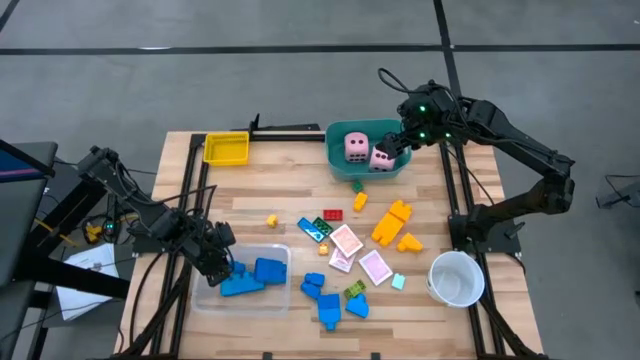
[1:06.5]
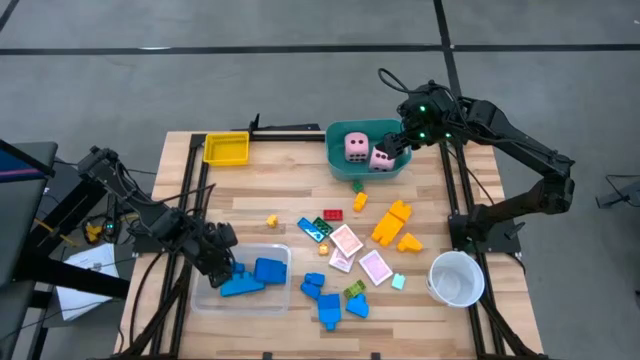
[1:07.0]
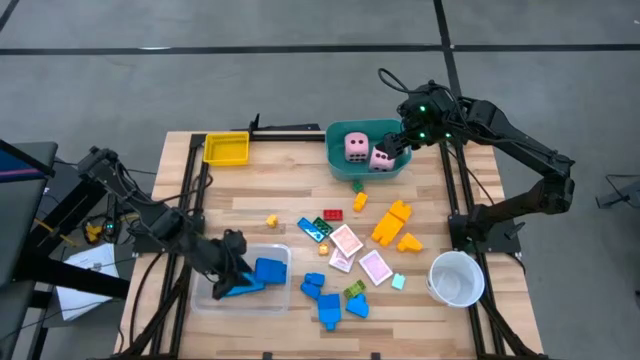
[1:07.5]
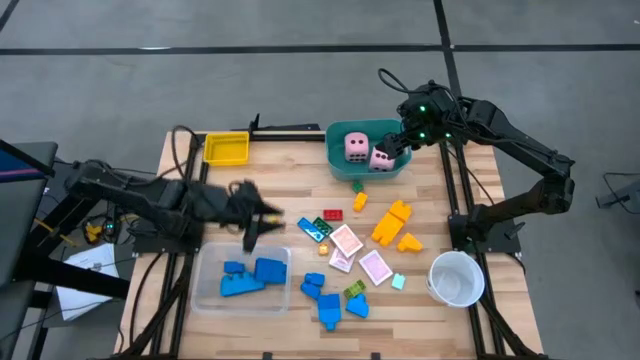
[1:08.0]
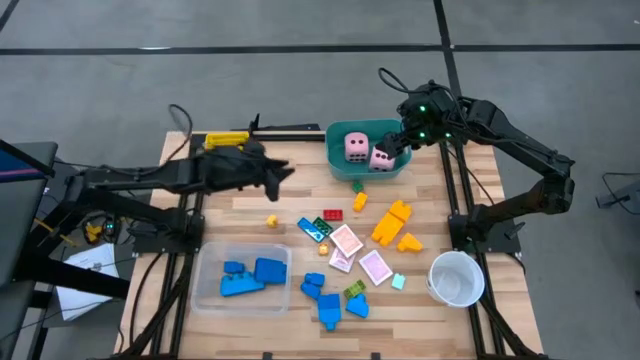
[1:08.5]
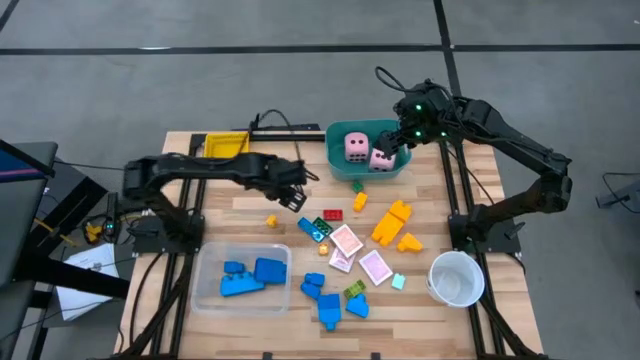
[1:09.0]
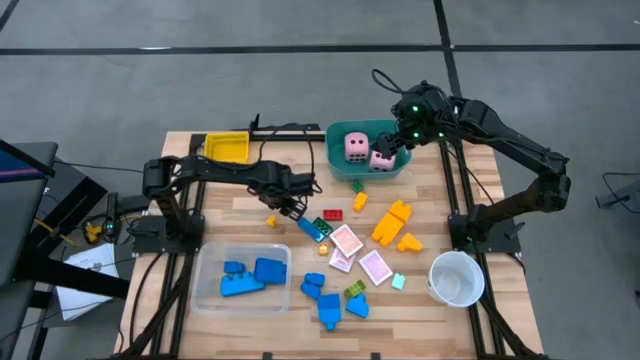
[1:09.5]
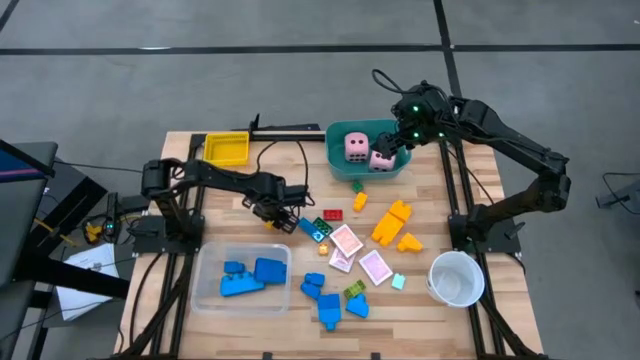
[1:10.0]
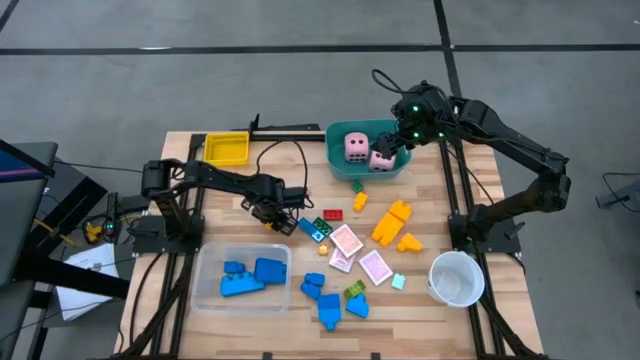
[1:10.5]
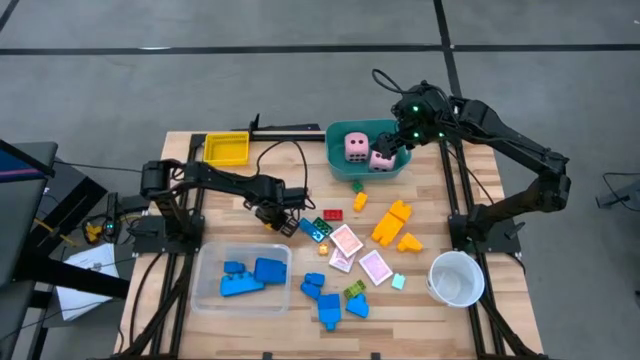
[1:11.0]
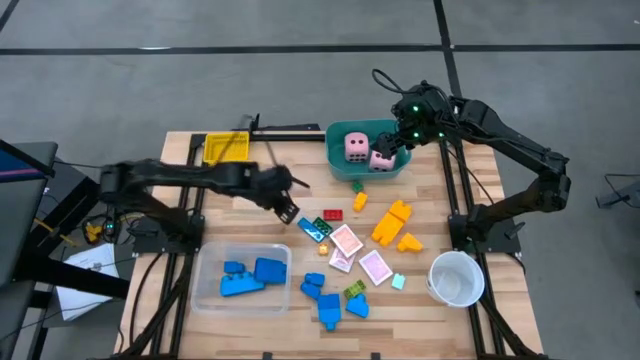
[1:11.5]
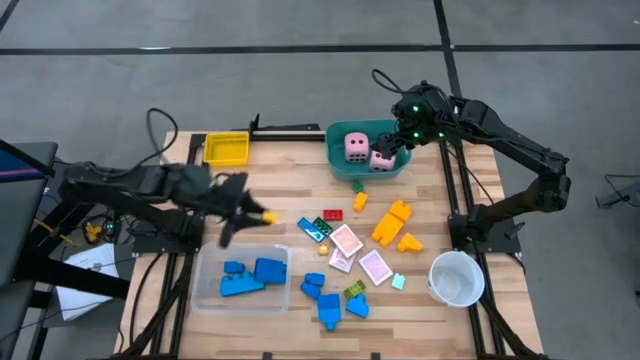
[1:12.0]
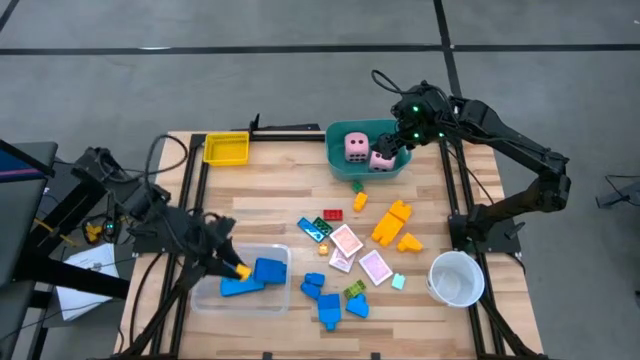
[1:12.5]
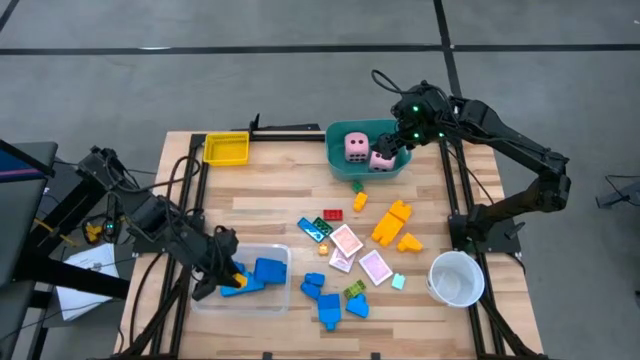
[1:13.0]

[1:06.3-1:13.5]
Task: Pick & Place Toys
Put the yellow game piece into the transparent bin

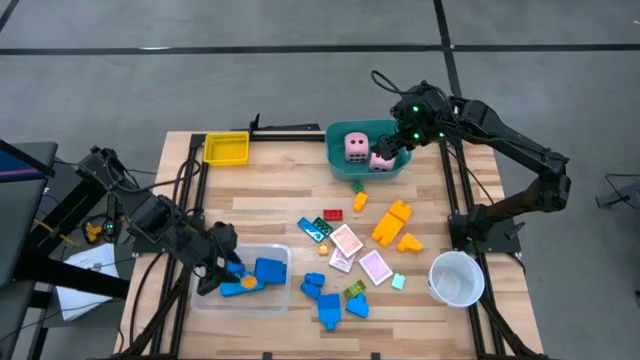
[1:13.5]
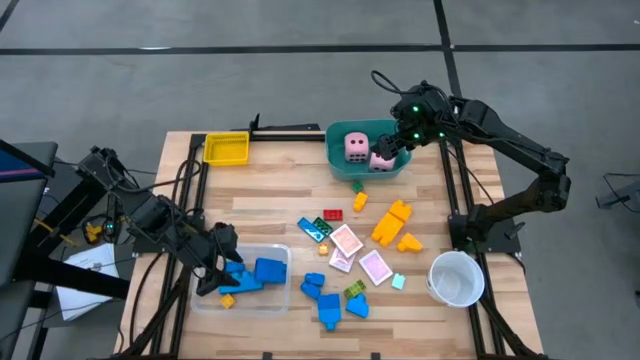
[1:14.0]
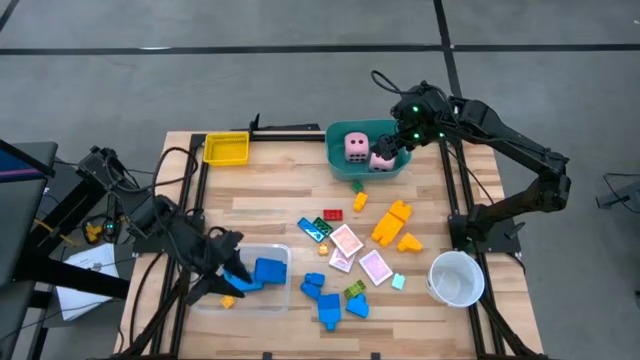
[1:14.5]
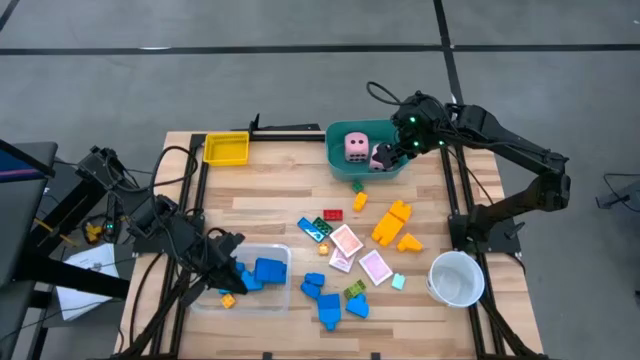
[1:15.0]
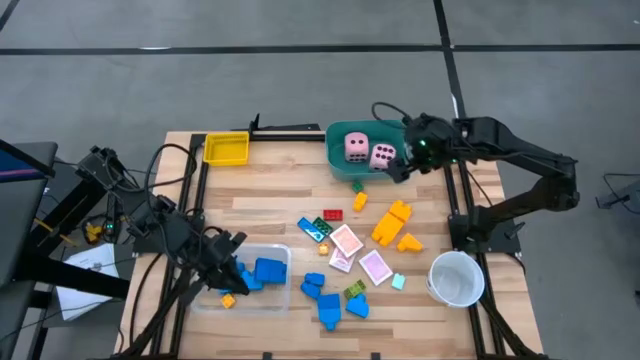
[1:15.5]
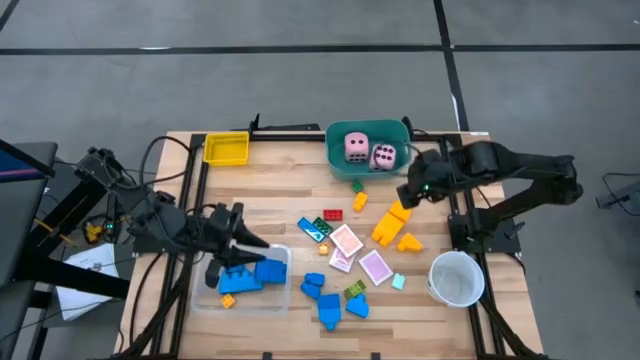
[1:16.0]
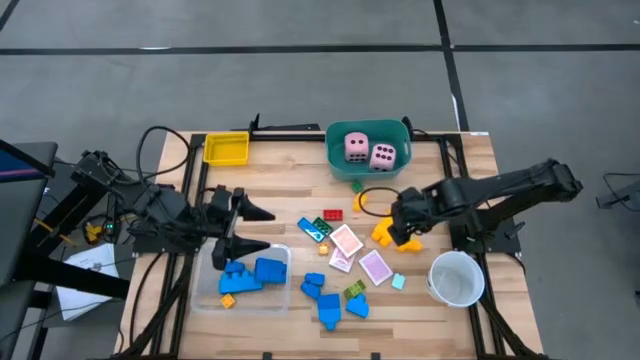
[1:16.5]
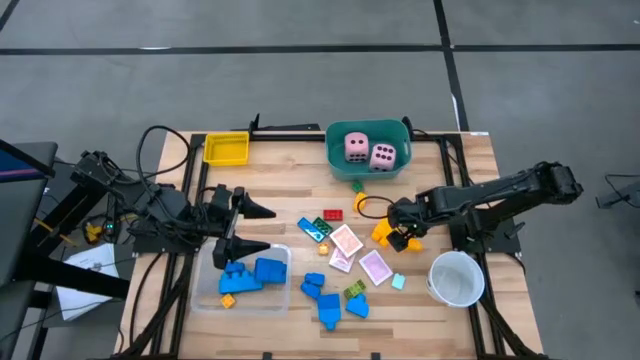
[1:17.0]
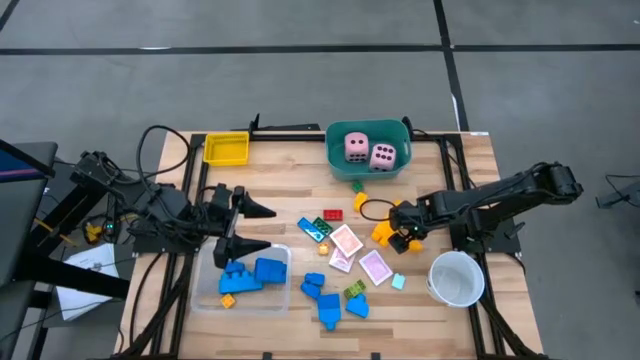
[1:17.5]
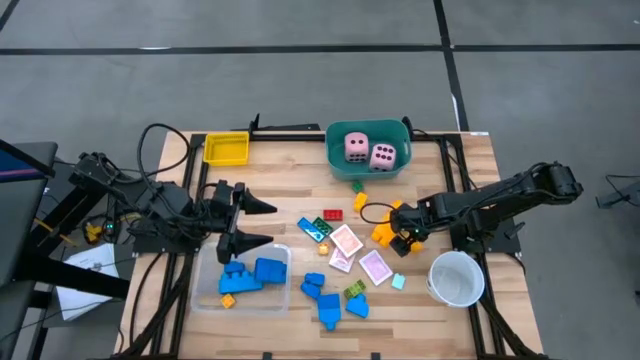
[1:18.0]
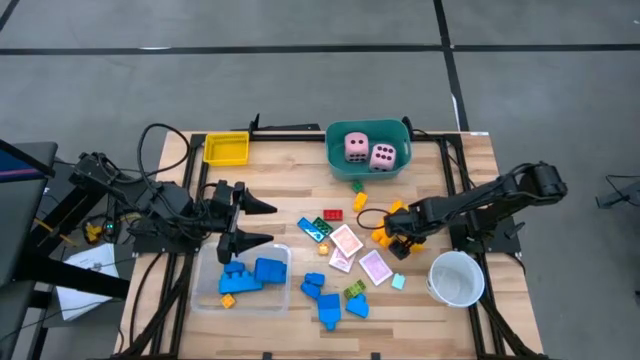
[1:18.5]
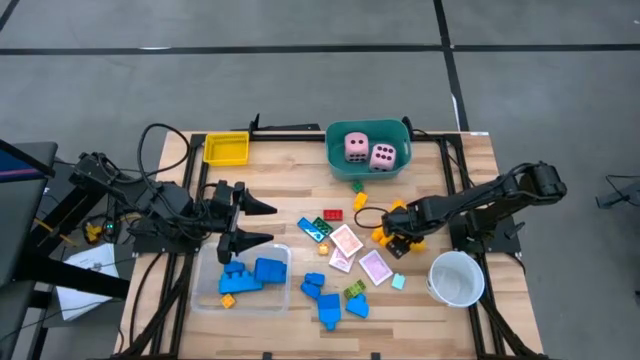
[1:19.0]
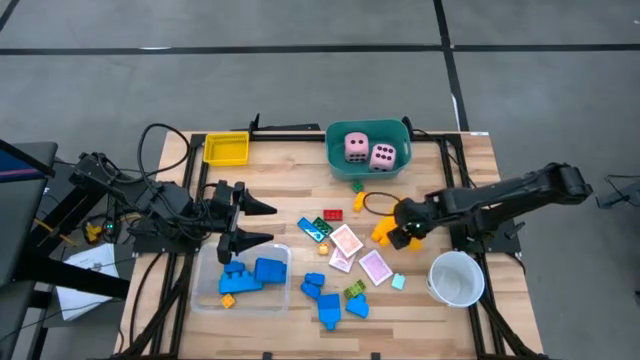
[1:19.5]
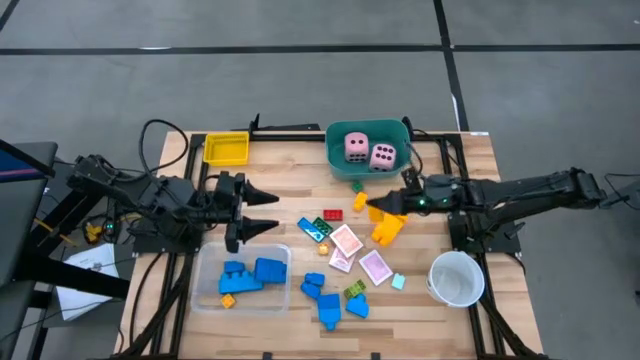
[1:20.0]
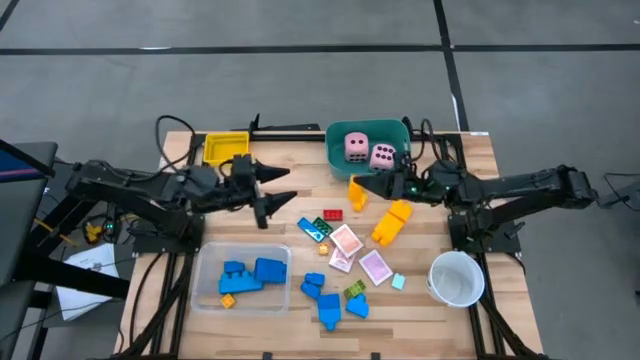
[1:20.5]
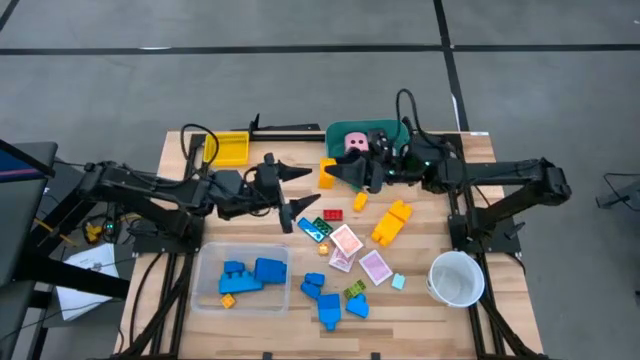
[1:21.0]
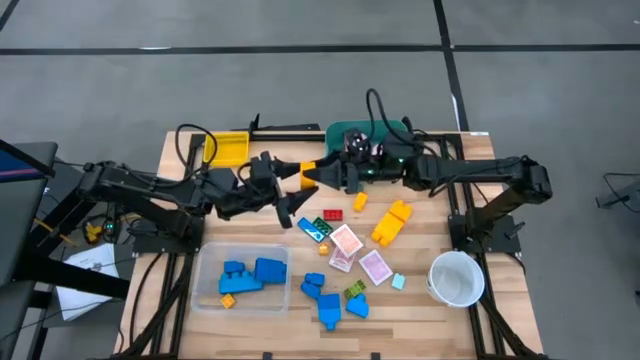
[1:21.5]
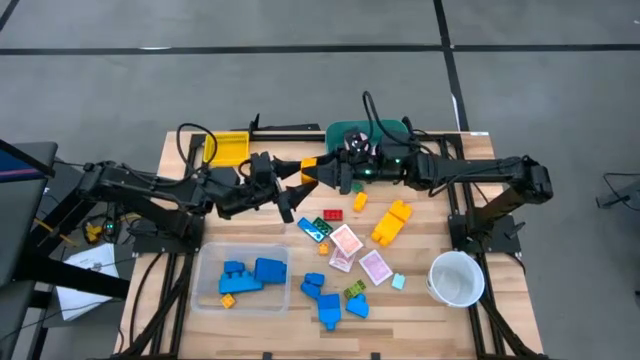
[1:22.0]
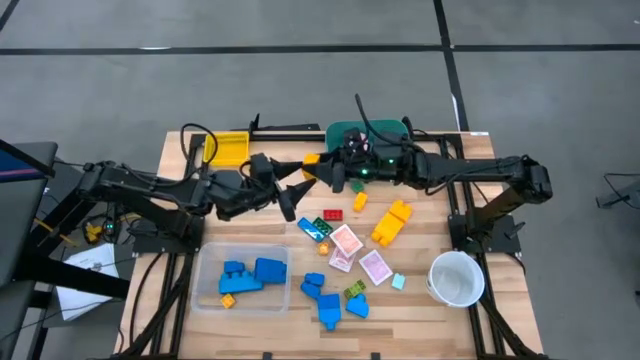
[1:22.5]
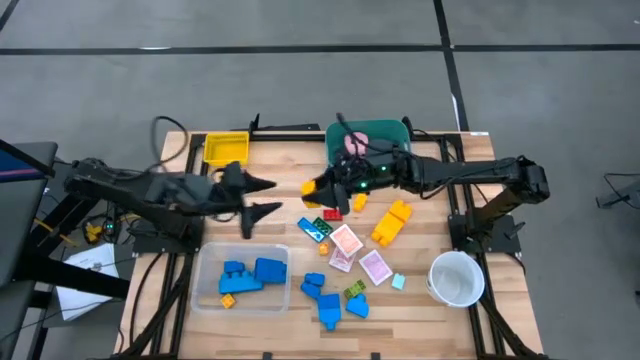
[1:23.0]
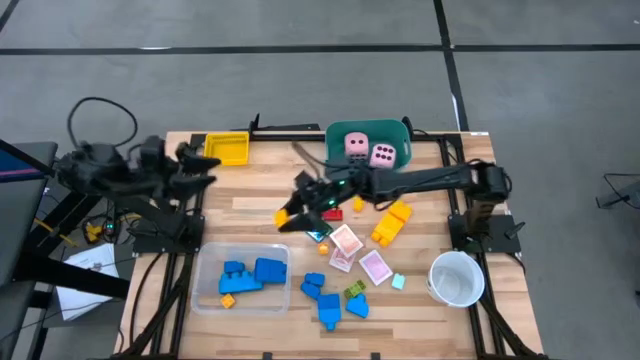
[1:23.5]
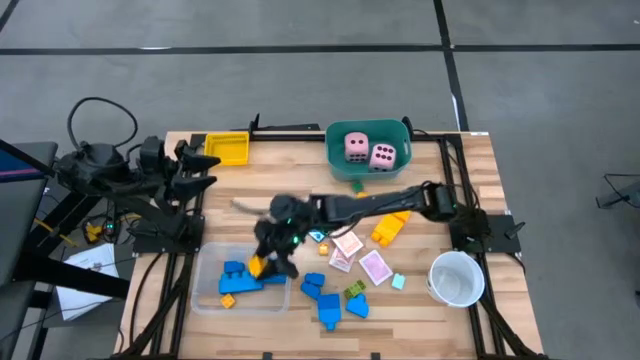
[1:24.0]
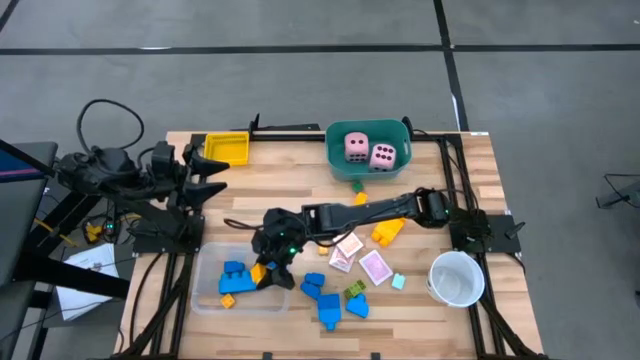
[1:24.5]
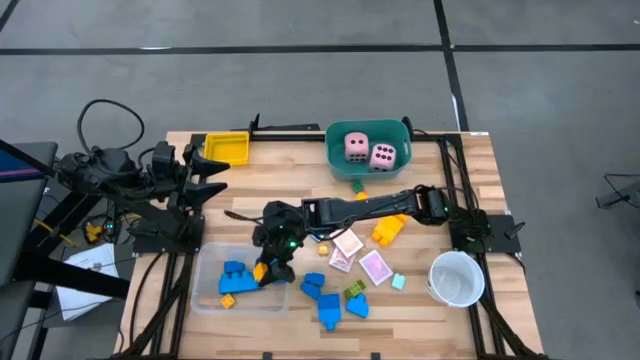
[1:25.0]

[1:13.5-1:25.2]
Put the yellow game piece into the transparent bin

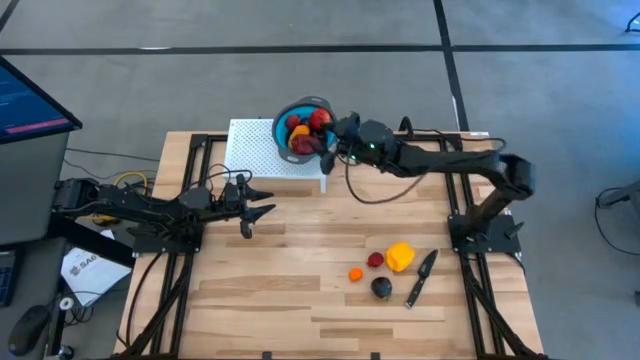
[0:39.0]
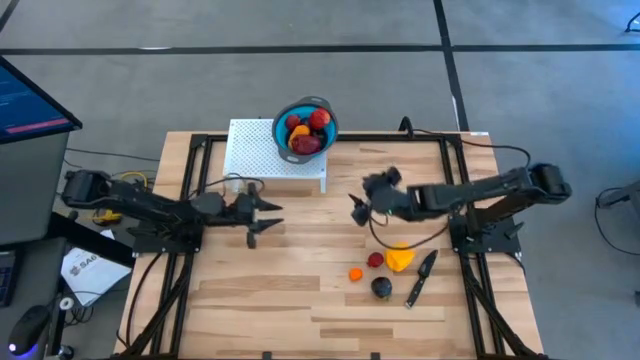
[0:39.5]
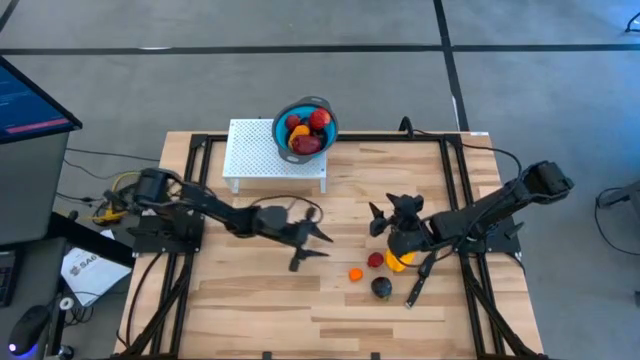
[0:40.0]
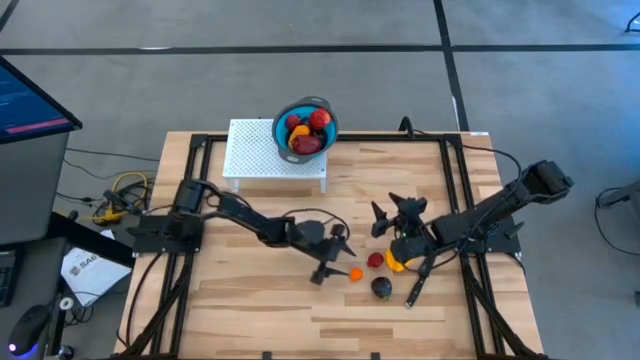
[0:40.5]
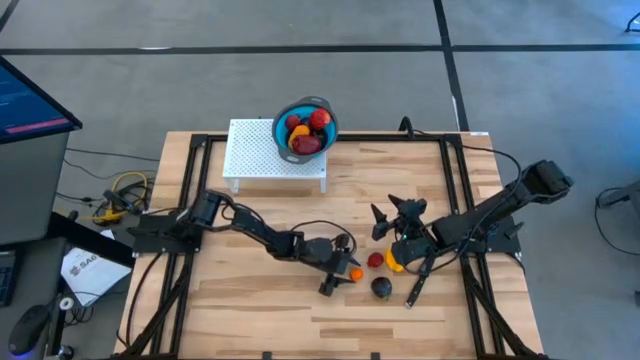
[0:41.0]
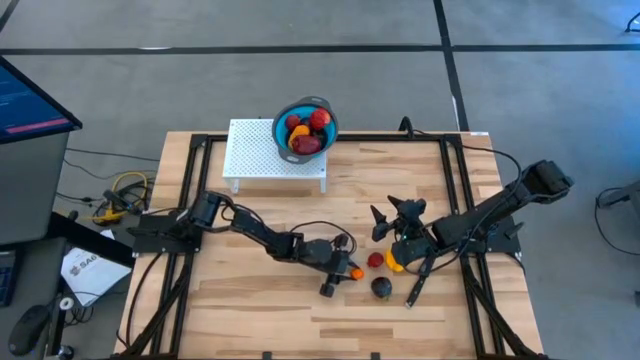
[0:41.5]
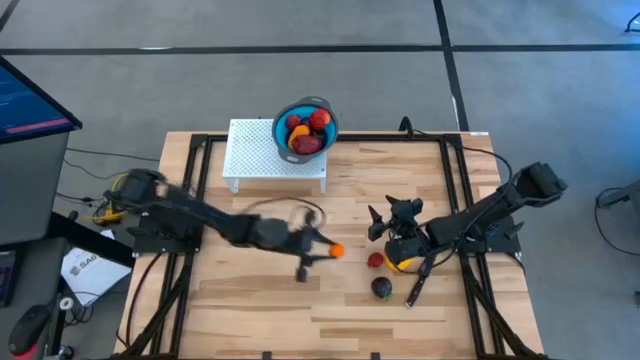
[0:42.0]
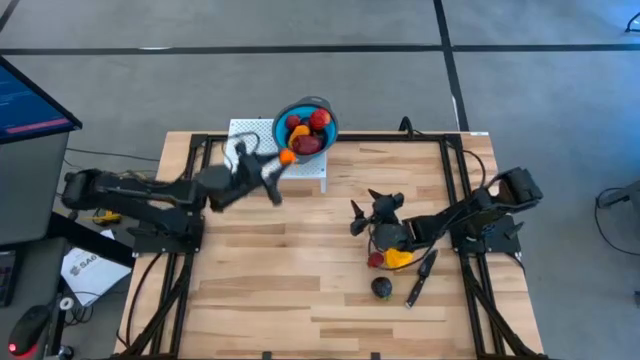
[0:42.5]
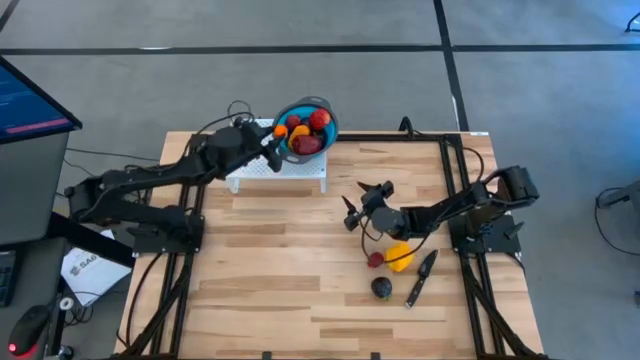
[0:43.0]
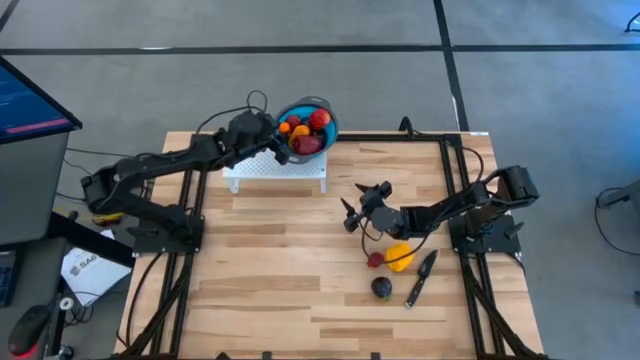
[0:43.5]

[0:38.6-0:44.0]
Task: Pick & Place Fruit
Put the orange into the blue strainer bowl
